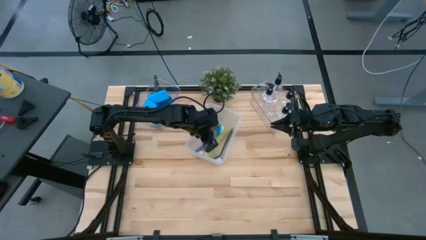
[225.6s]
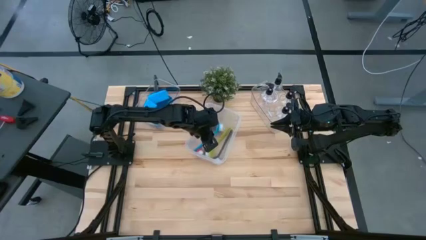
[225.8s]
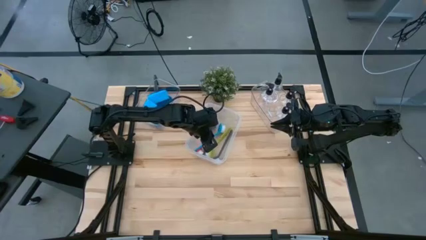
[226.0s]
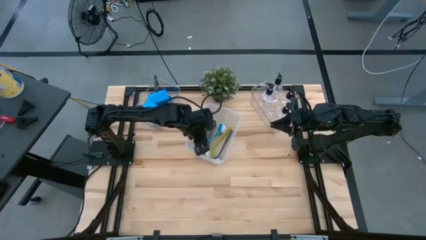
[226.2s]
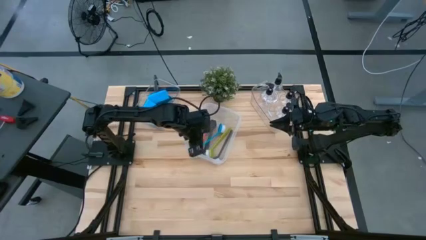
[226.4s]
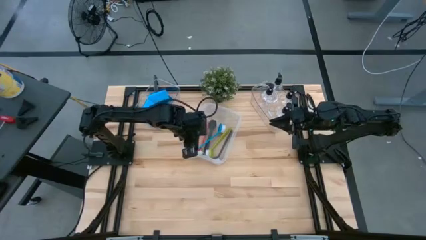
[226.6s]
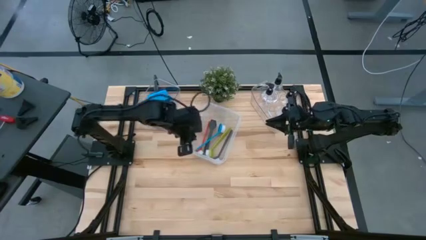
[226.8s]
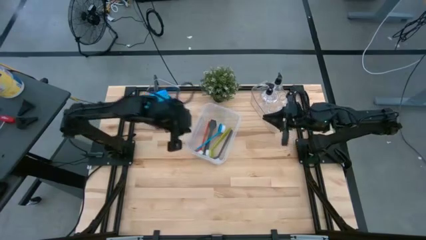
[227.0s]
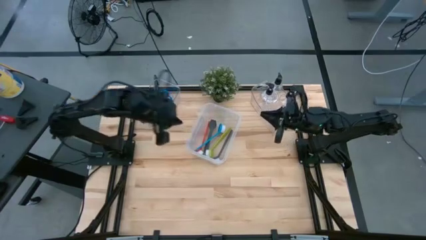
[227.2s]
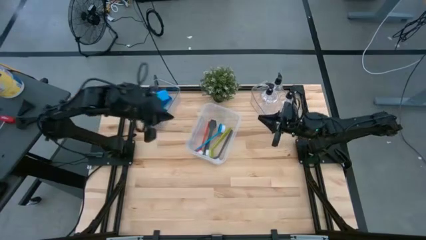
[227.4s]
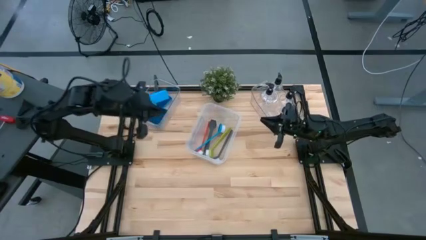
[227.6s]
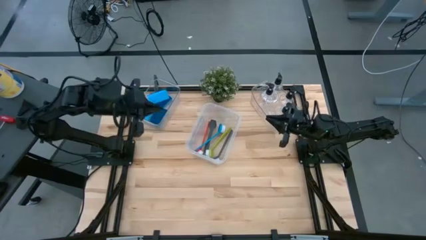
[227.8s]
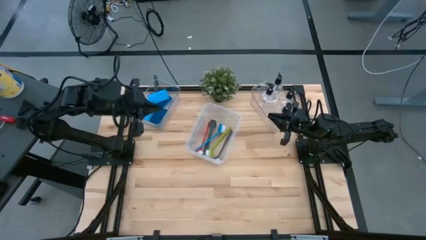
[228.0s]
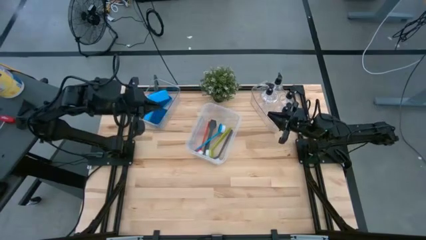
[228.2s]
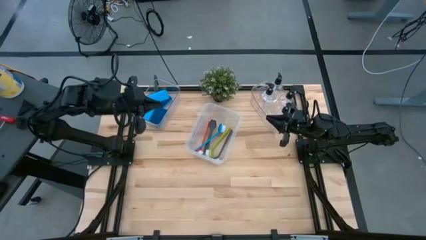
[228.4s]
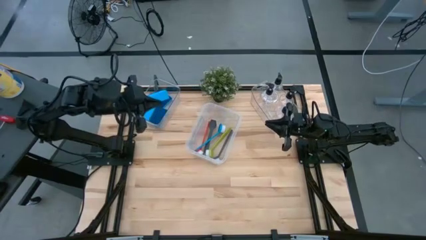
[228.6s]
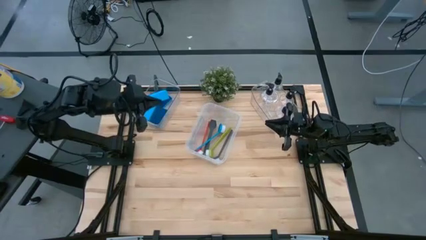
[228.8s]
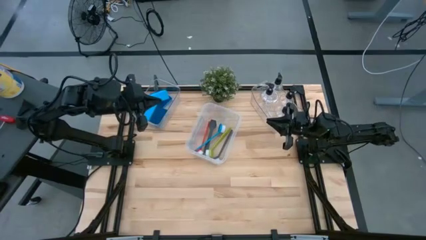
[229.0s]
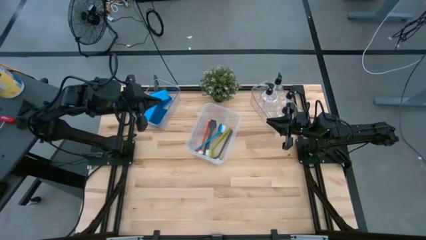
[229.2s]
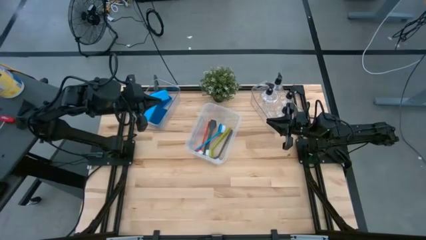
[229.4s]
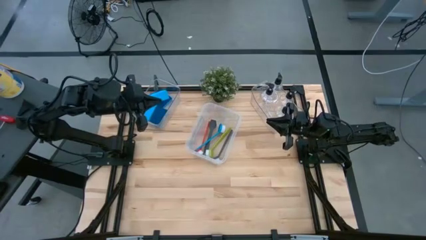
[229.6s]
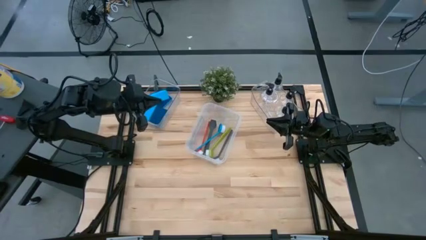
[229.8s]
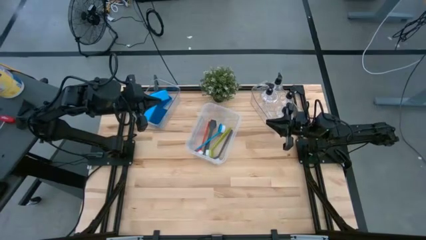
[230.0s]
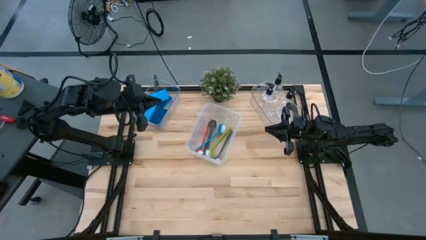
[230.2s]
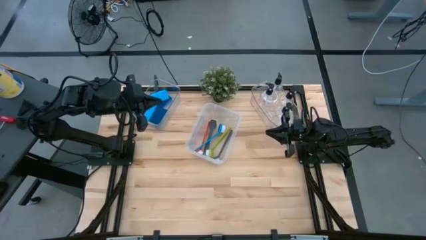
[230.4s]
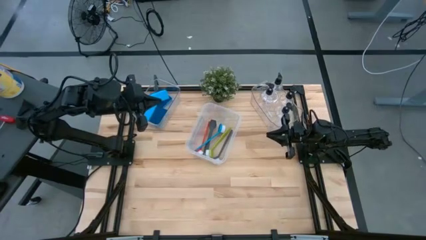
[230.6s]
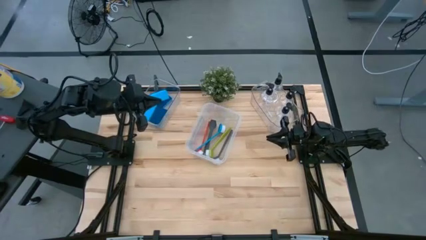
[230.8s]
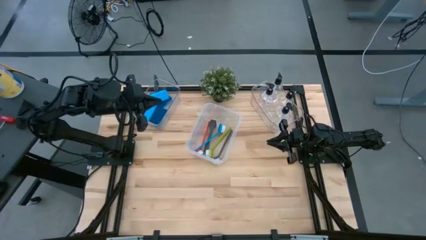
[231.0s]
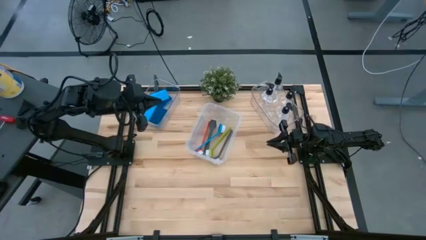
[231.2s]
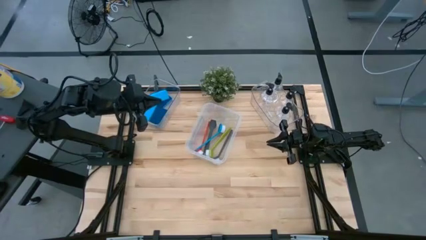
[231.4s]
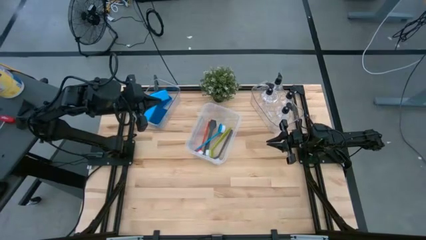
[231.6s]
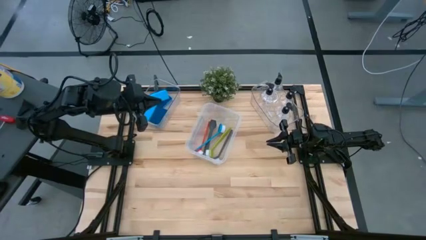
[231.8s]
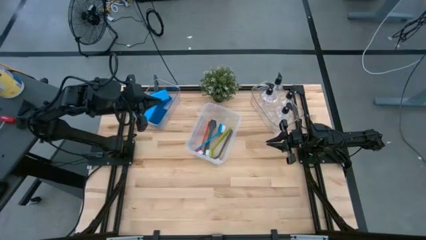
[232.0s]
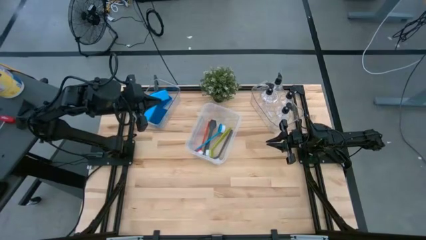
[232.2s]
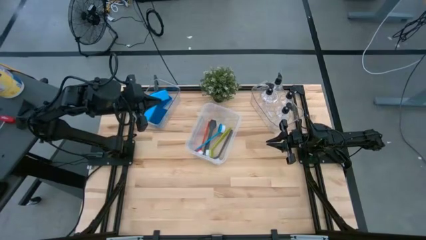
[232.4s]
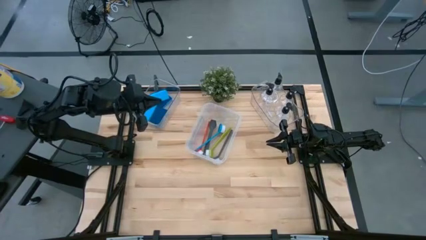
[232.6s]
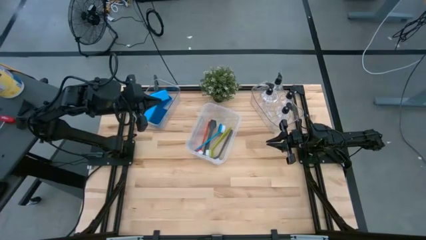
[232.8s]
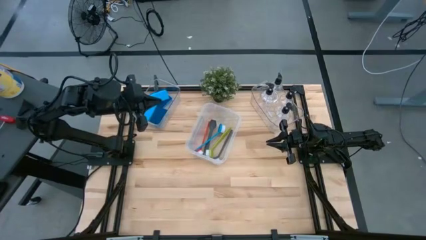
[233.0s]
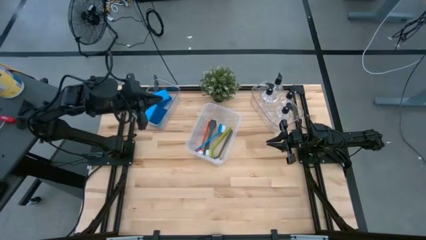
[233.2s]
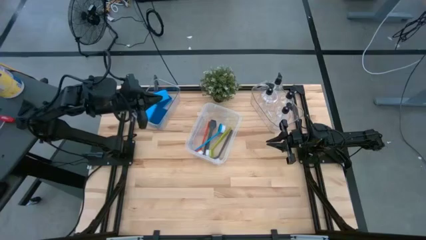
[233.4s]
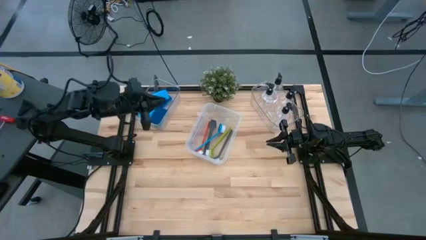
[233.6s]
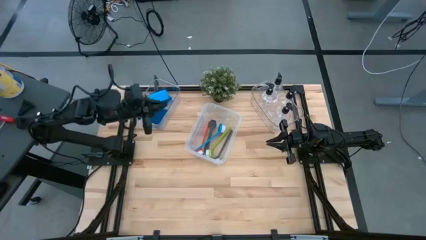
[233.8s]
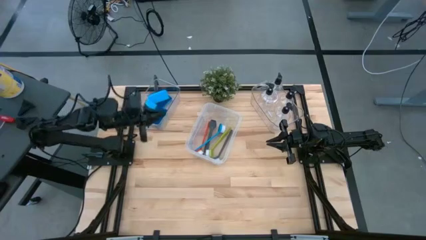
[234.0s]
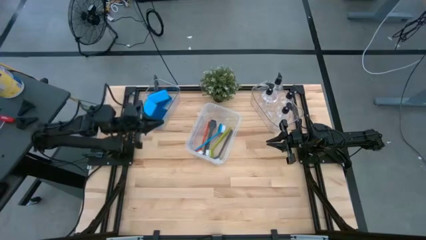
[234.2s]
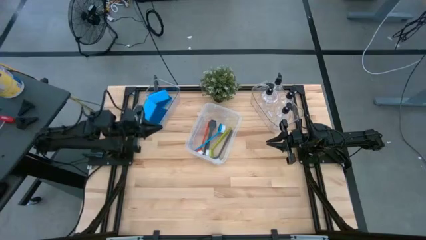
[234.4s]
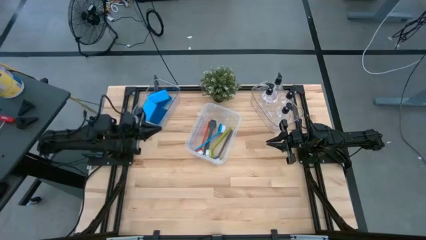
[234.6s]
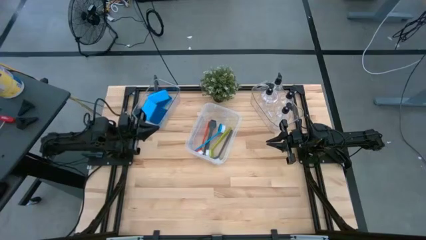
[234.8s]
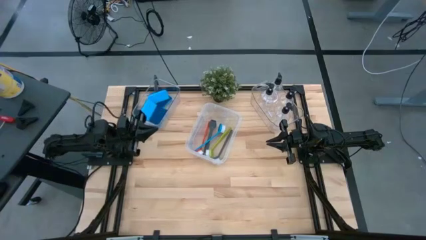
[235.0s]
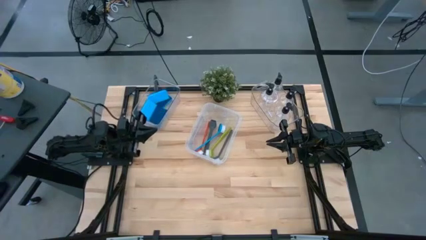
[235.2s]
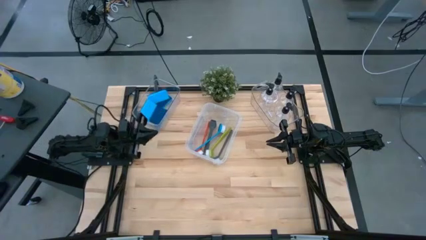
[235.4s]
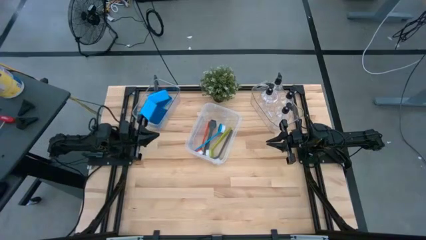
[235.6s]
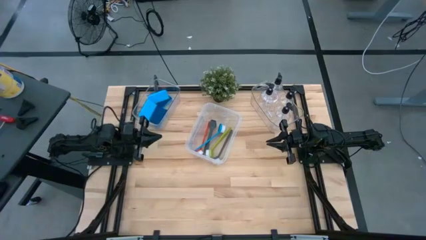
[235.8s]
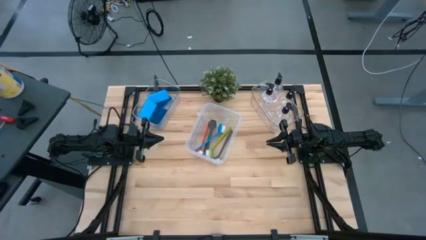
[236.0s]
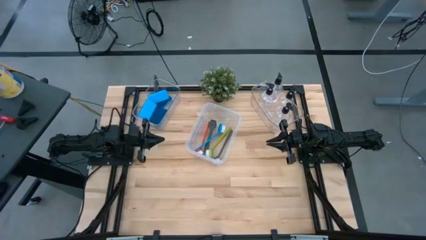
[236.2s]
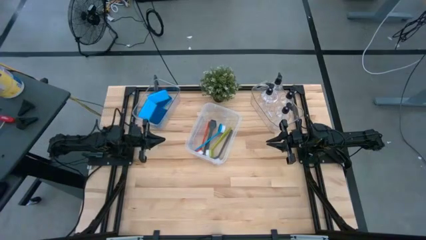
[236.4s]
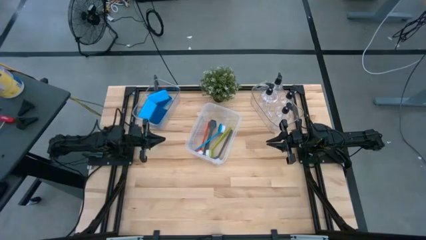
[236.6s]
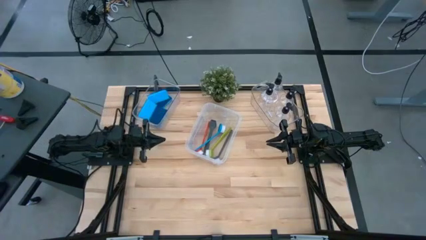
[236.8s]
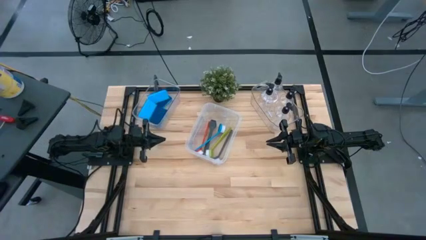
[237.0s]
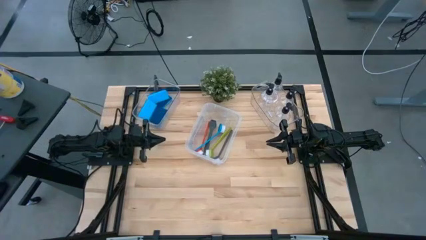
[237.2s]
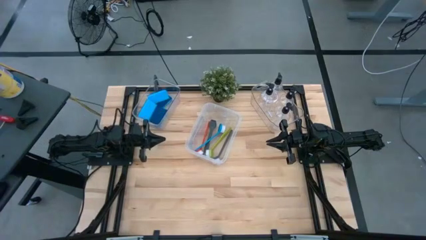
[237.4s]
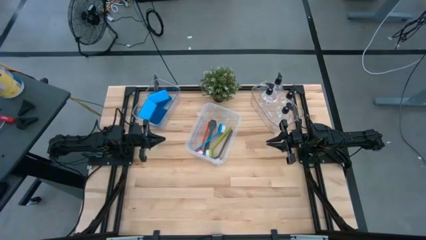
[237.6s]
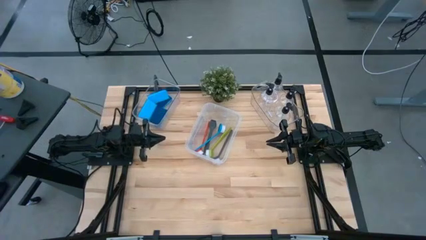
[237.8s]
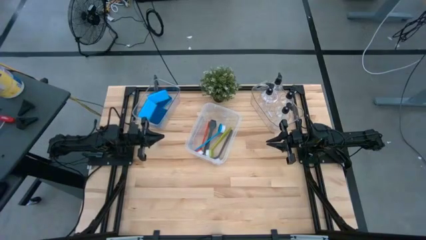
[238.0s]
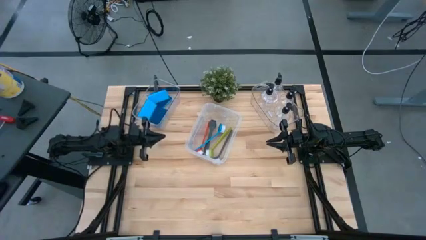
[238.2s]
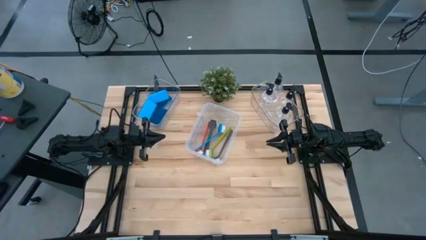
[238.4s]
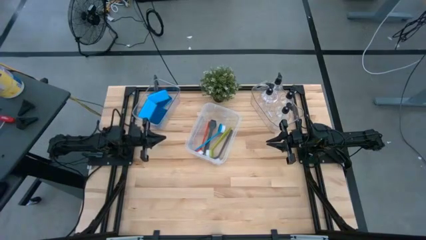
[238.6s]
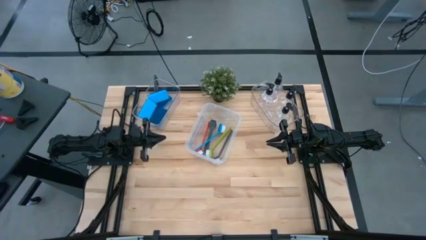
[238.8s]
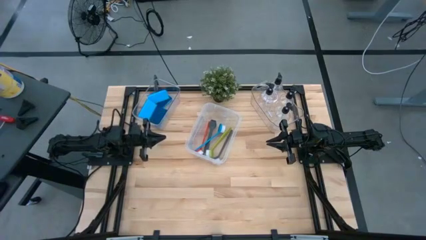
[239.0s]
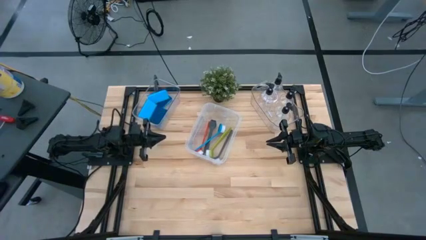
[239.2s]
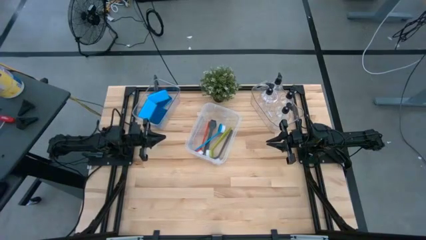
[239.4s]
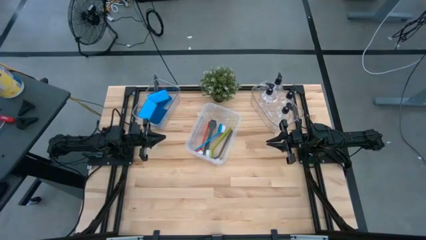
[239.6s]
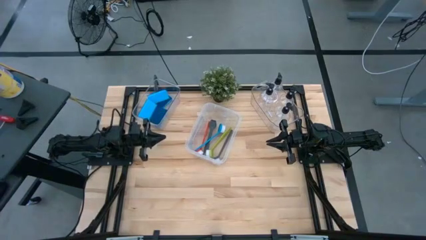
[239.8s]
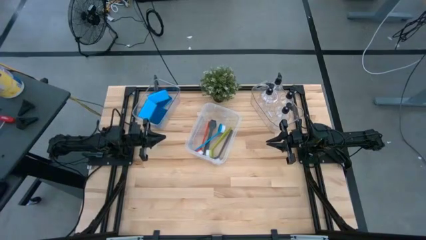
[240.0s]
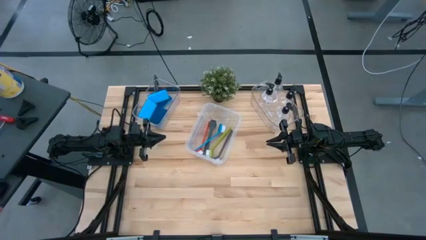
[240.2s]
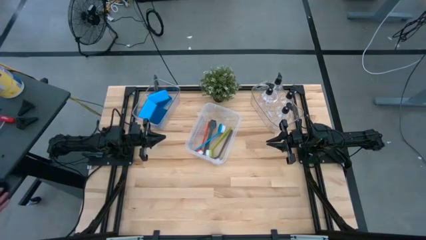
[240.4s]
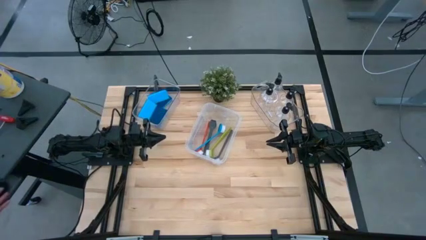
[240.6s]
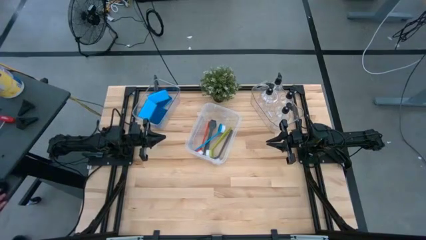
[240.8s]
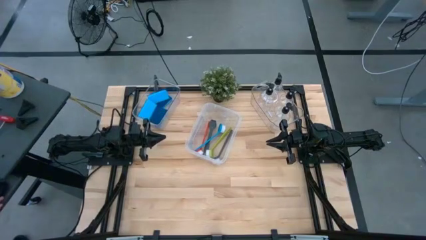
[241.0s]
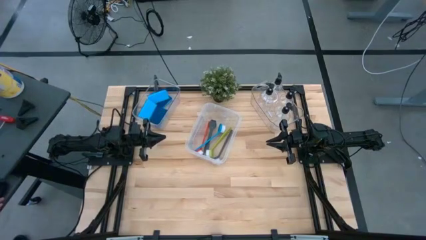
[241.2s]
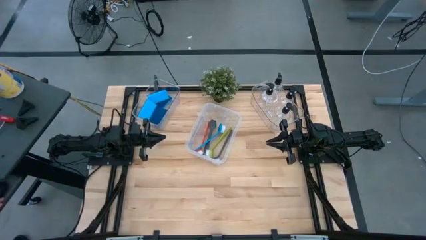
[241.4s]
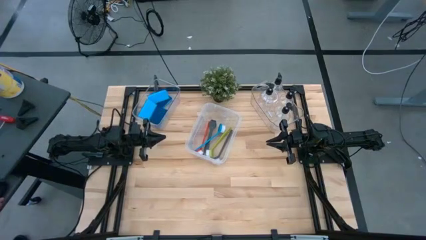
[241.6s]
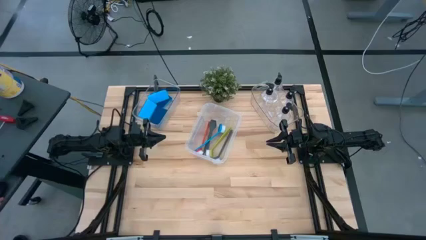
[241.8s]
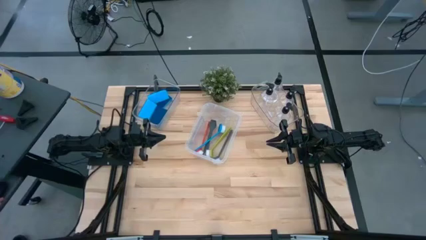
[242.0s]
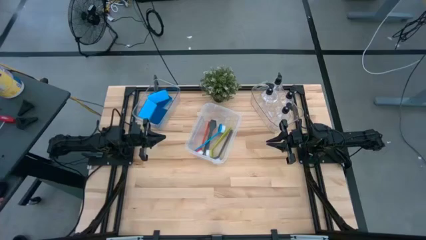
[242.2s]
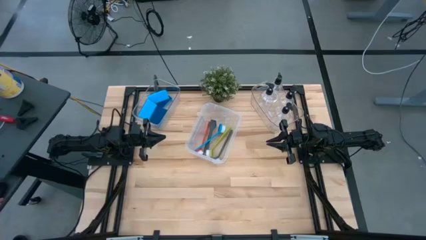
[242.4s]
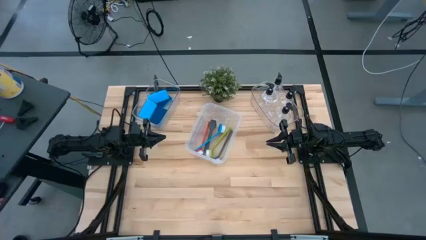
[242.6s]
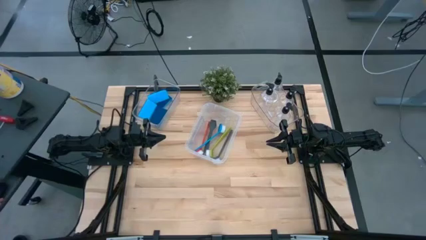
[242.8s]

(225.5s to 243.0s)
Task: Pick & Place Kitchen Sink Supplies
Return to home position
